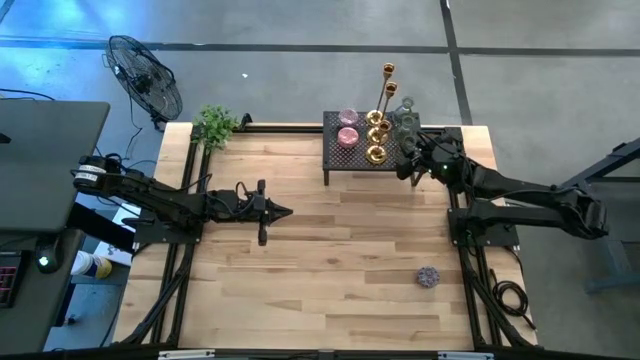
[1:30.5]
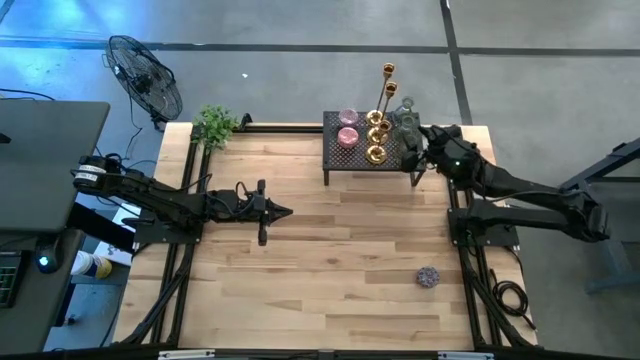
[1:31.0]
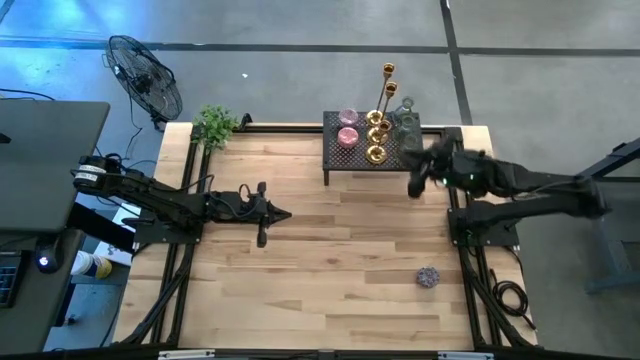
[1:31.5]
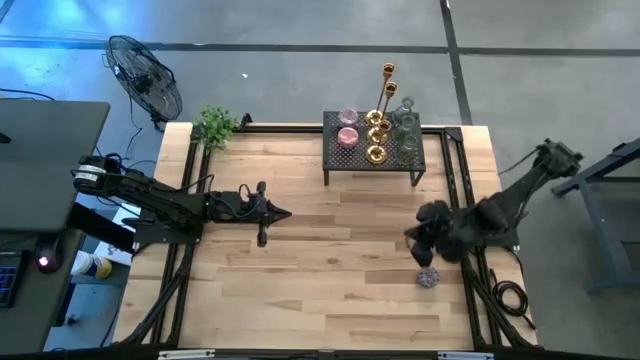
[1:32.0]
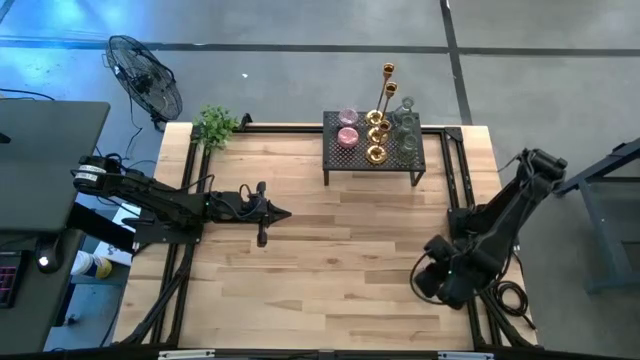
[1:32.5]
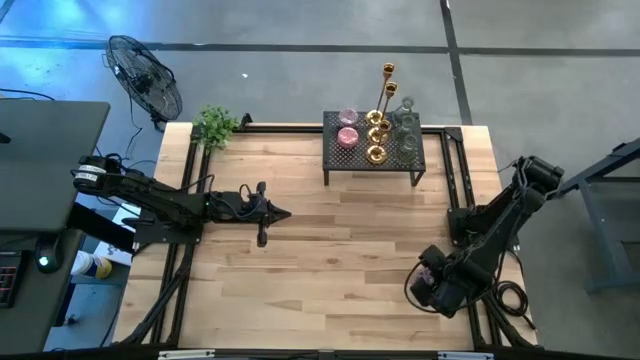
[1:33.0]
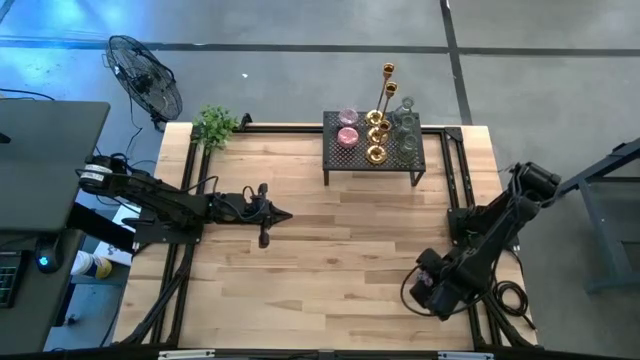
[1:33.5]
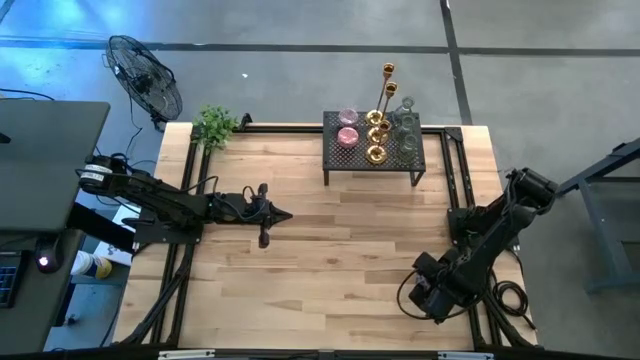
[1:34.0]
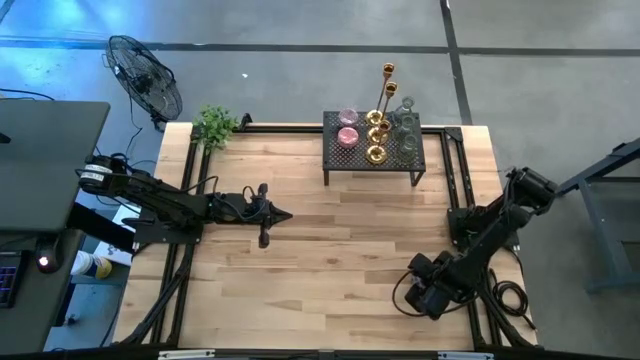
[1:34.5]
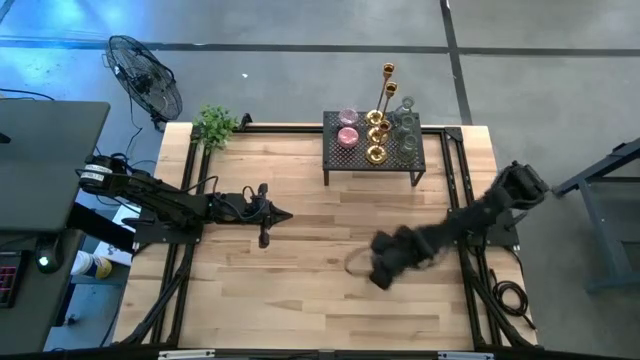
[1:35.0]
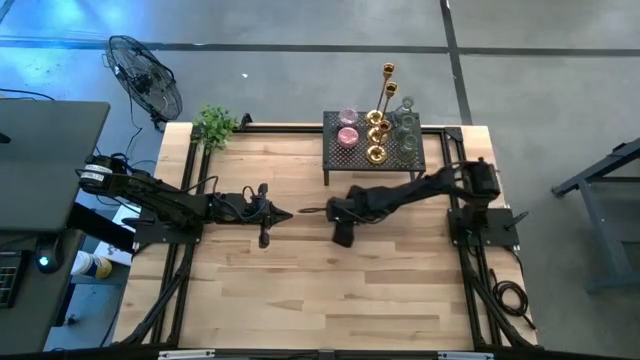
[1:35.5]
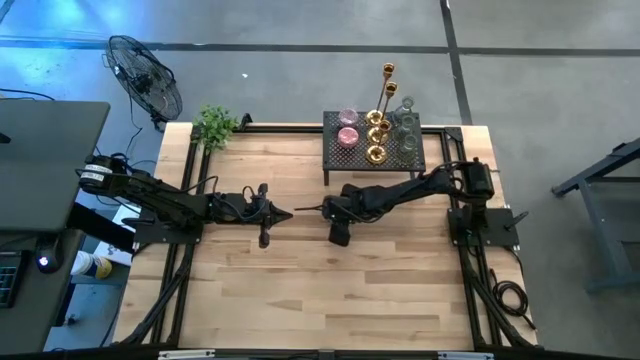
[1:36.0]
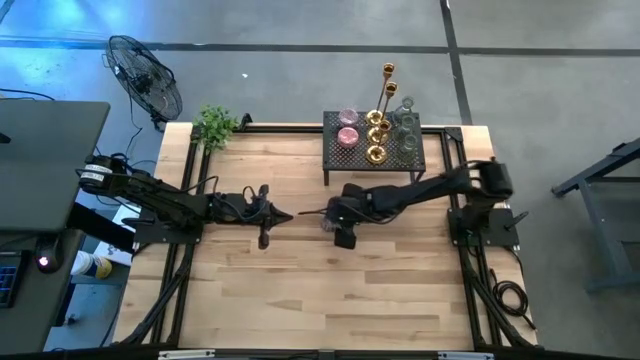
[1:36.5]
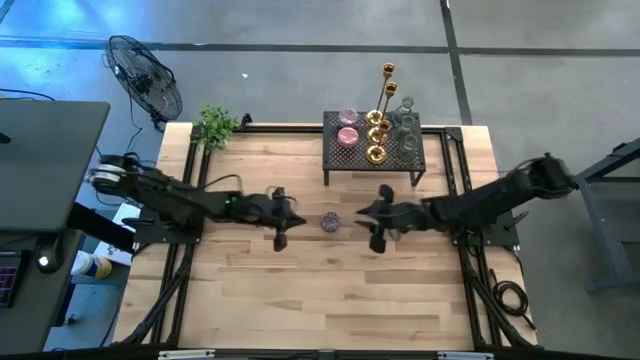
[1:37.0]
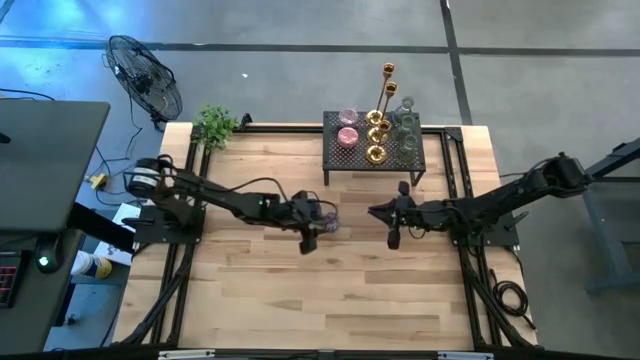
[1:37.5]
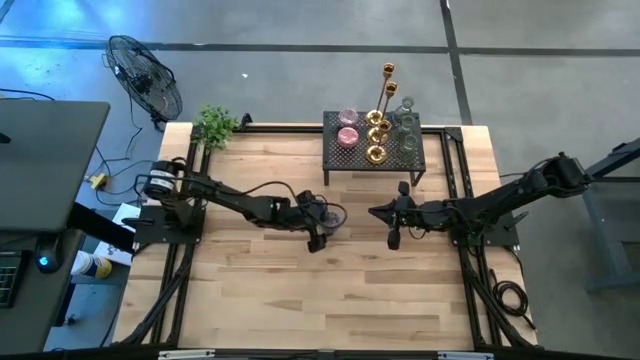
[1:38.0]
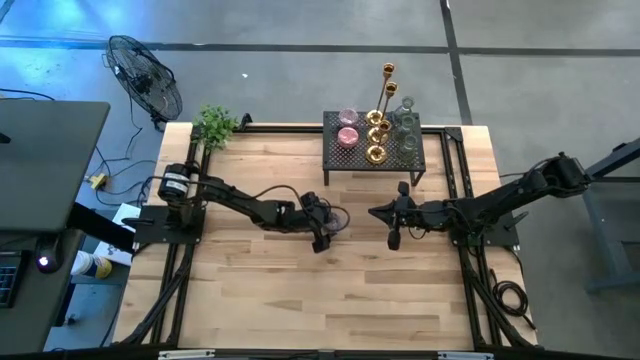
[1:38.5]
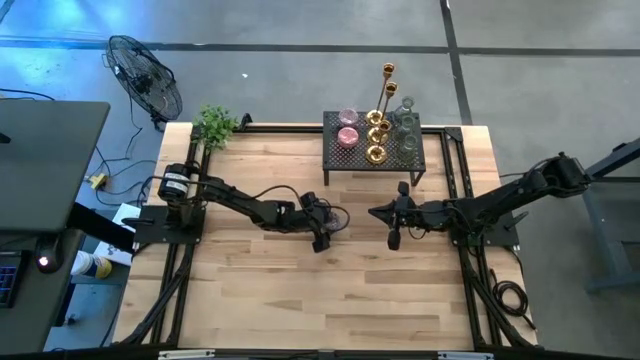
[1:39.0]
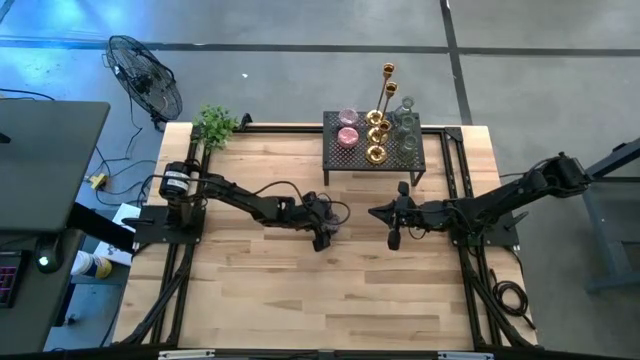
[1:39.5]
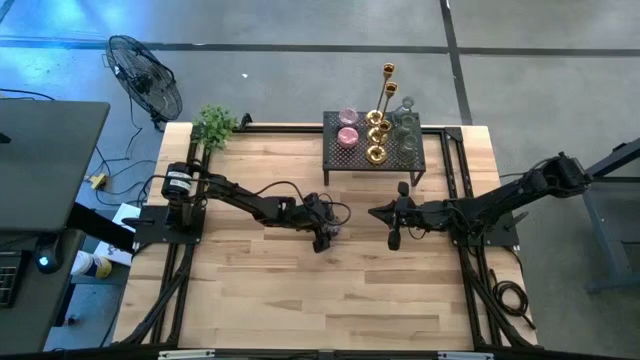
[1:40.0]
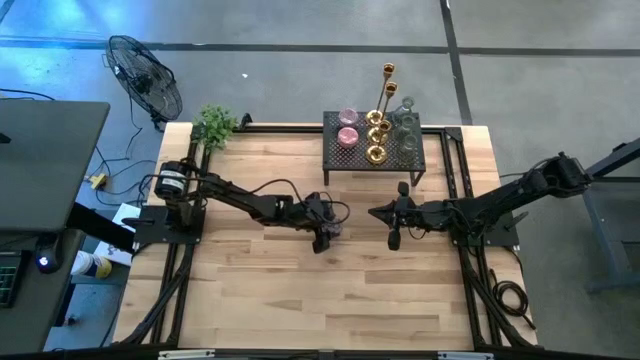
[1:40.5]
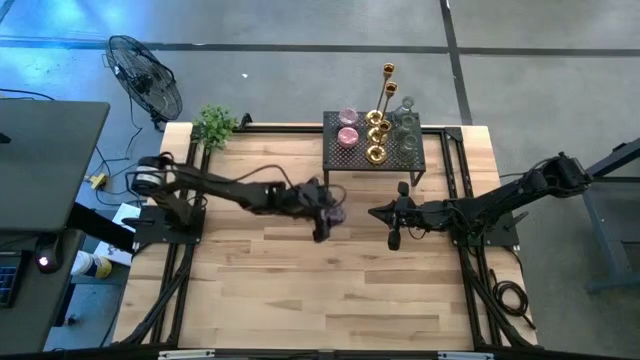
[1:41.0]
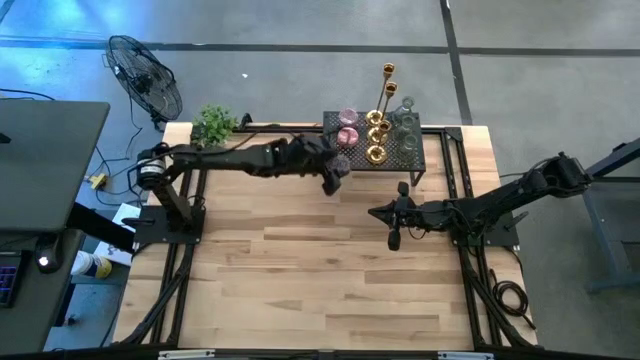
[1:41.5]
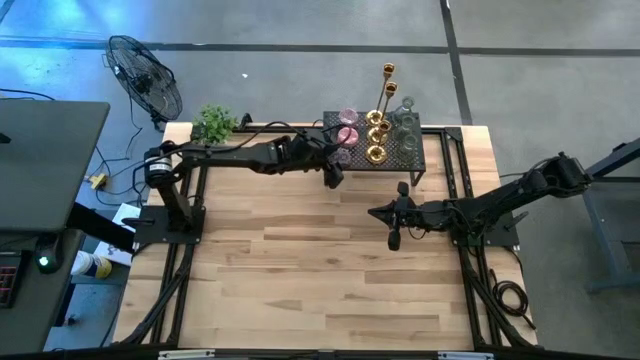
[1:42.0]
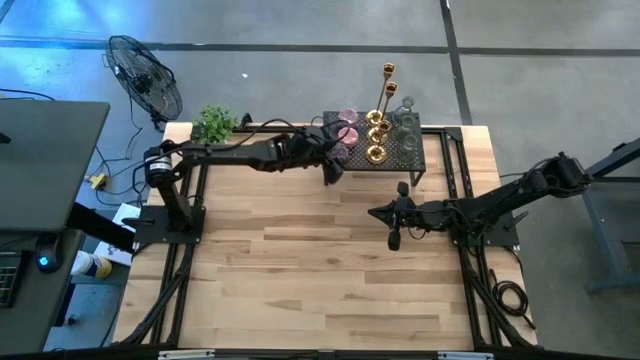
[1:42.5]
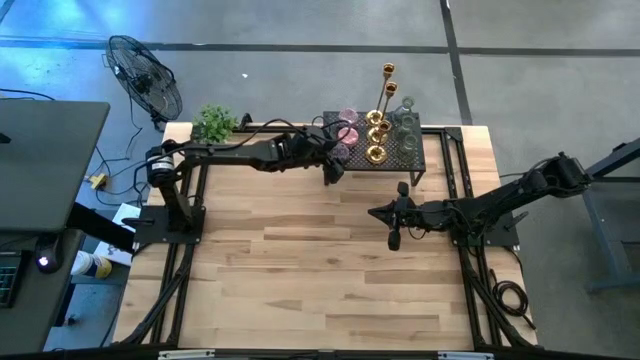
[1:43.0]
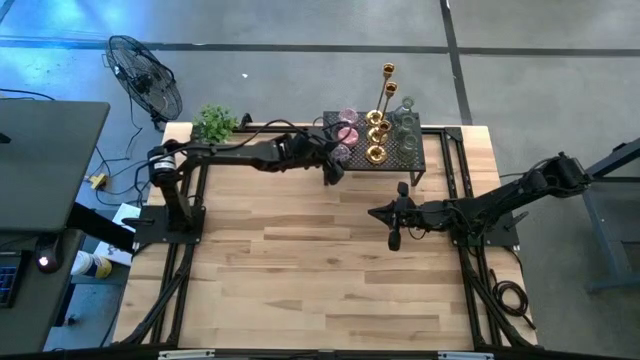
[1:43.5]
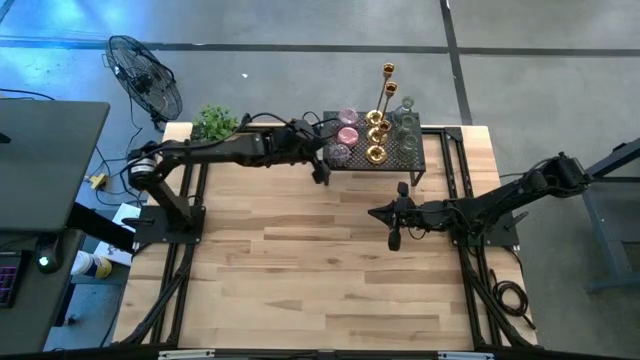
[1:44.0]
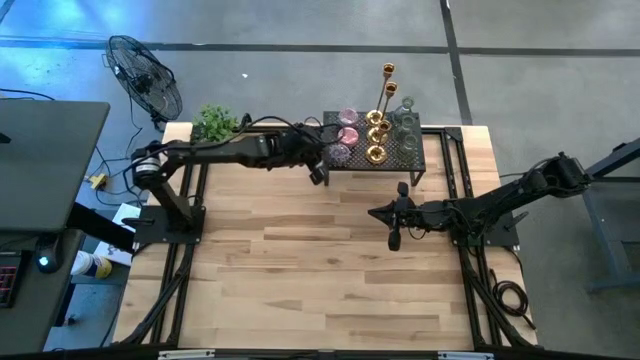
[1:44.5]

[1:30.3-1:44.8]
Task: Pick & Place candle stick holders
Put the black patterned scented candle on the shelf aligned with the pink scented candle

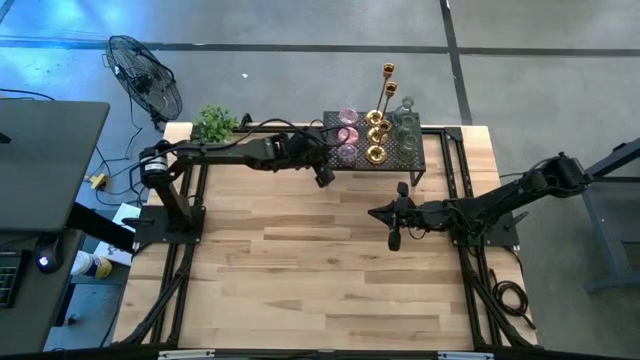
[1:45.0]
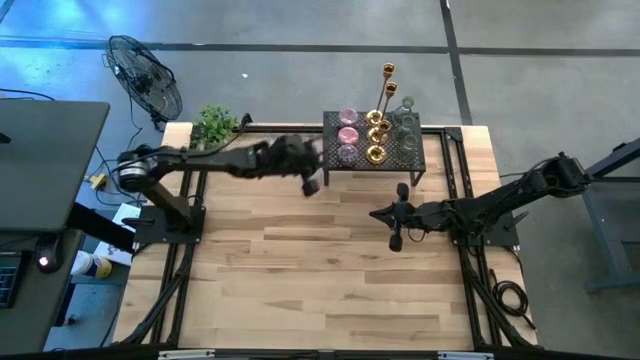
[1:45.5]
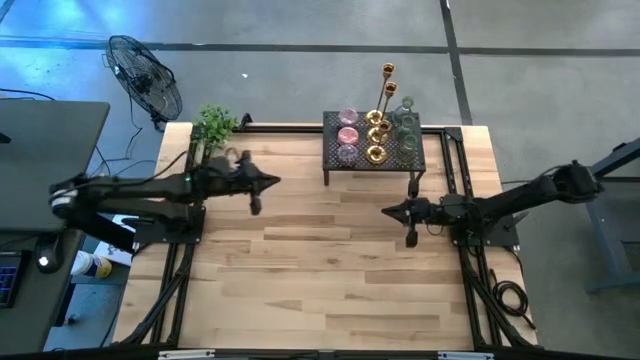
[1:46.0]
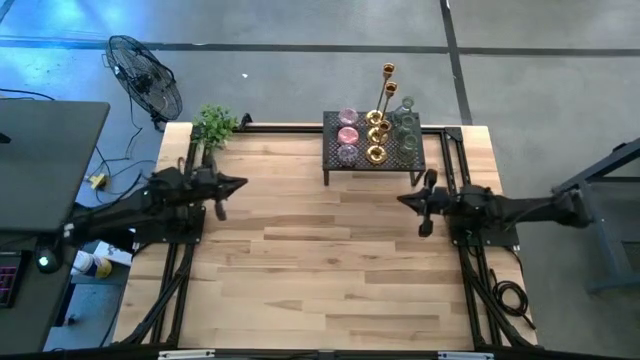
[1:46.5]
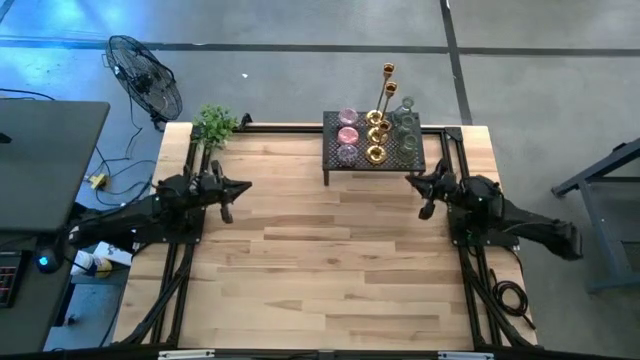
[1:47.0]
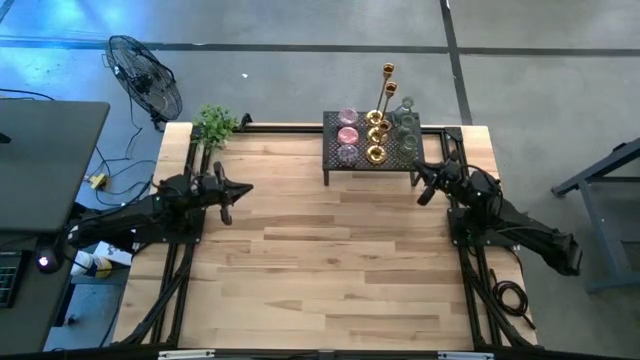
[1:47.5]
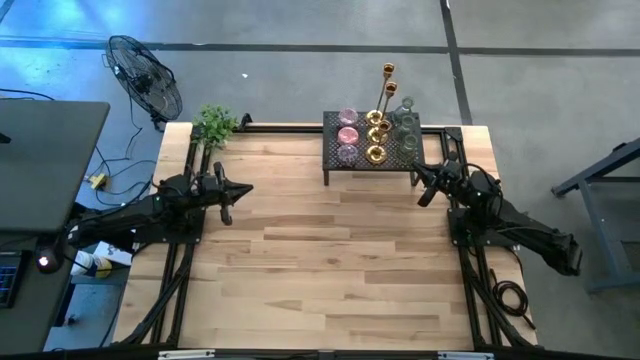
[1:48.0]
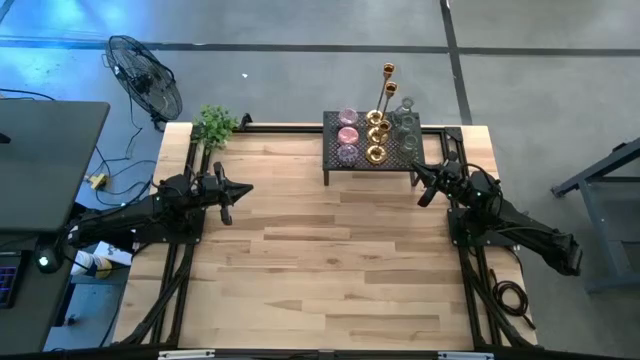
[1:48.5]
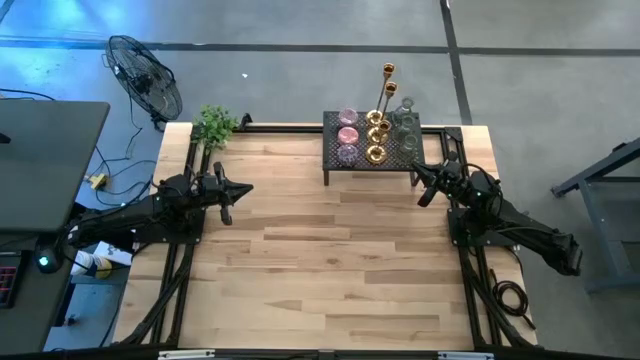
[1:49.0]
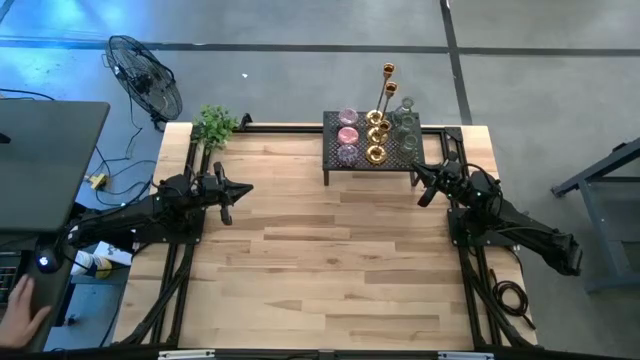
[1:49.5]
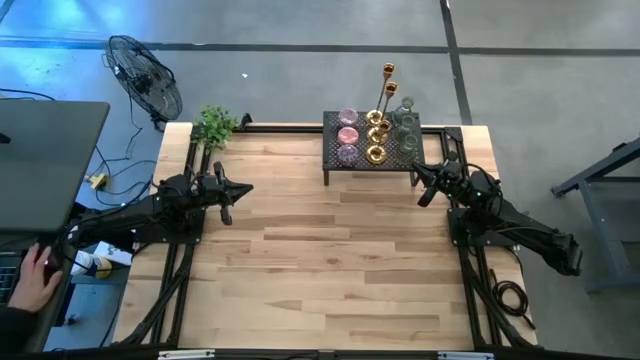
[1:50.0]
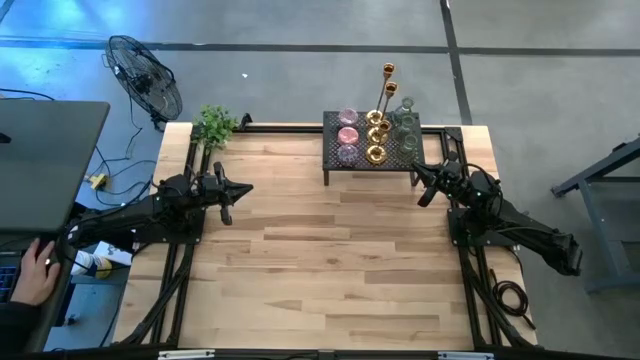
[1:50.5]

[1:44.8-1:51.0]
Return to Home Position

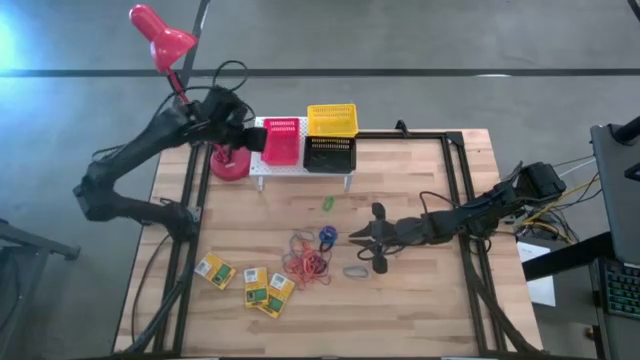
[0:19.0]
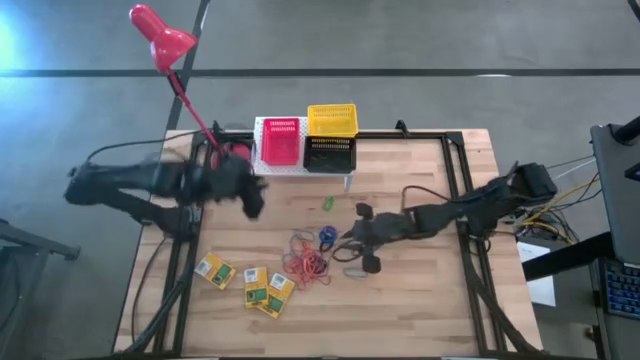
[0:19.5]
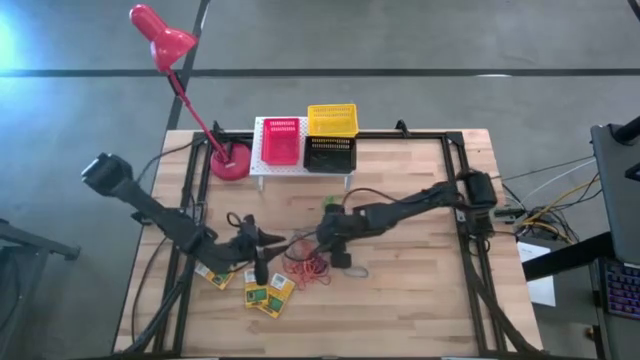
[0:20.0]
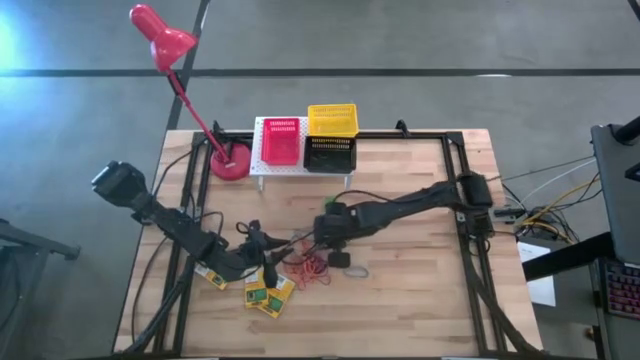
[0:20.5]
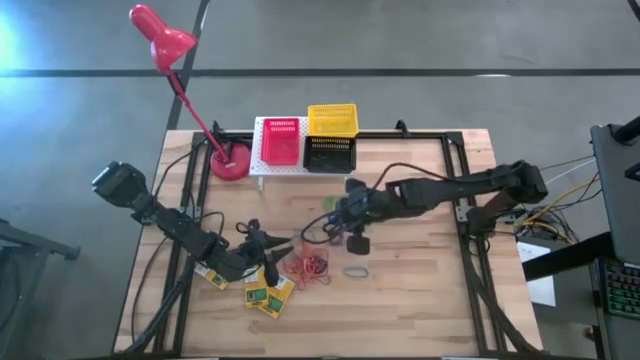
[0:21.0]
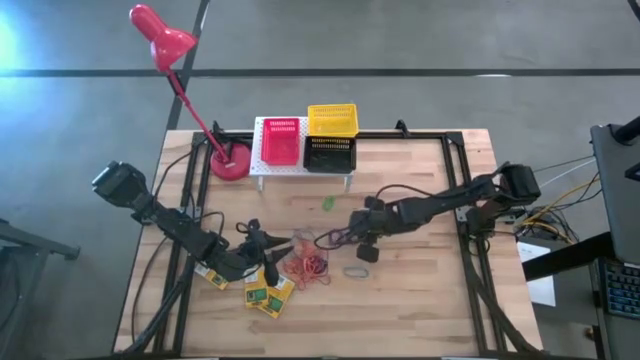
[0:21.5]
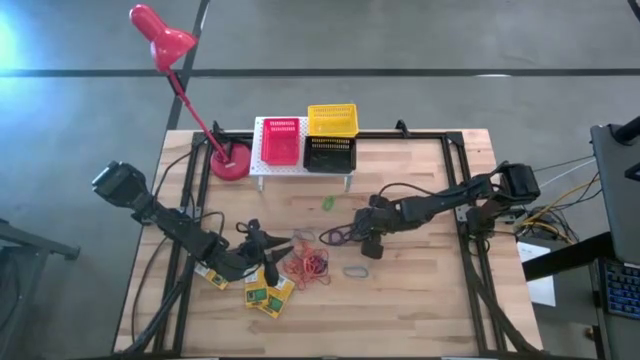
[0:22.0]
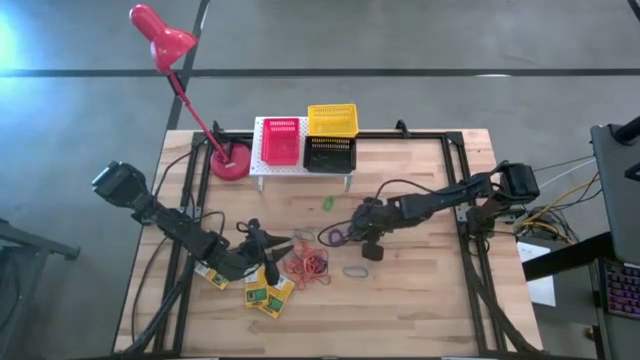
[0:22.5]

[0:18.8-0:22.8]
Task: Pick & Place Office Desk Supplies
Put the blue spring keychain into the yellow bin on the shelf
